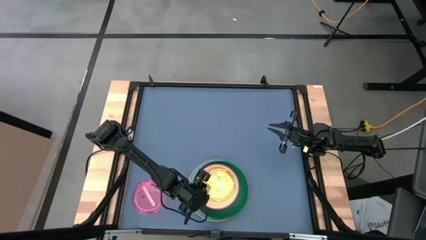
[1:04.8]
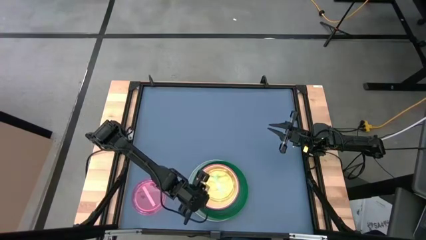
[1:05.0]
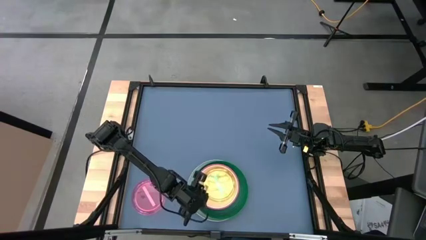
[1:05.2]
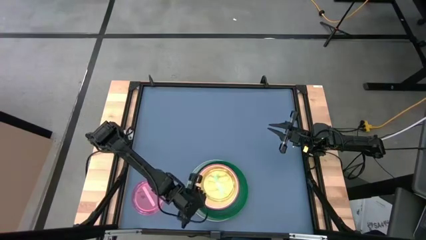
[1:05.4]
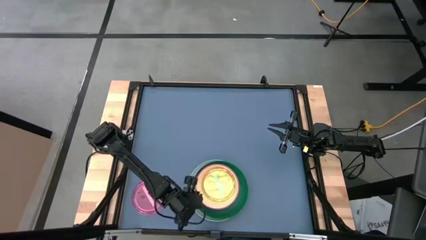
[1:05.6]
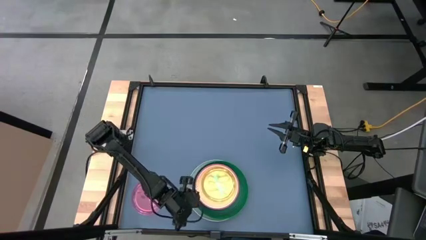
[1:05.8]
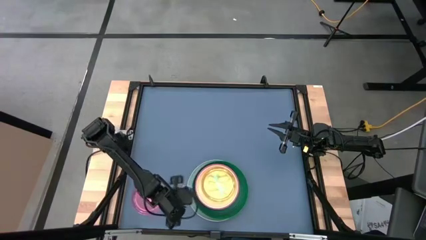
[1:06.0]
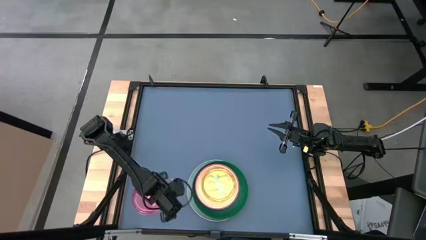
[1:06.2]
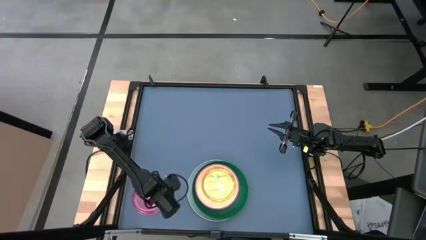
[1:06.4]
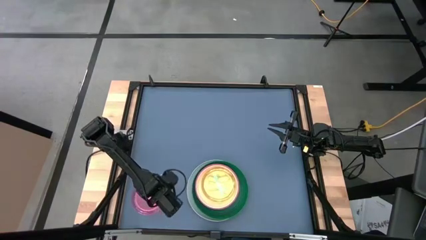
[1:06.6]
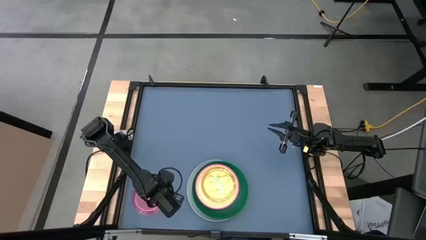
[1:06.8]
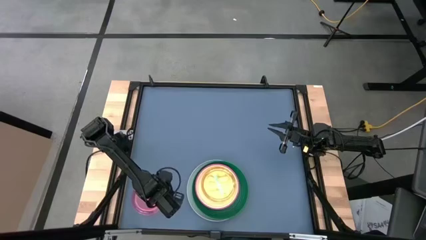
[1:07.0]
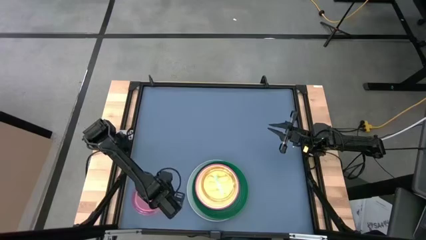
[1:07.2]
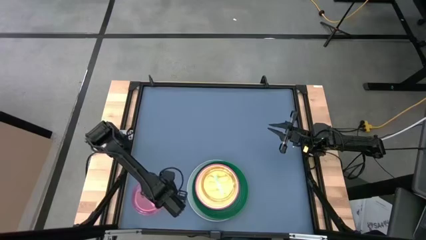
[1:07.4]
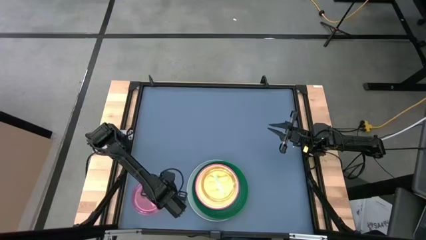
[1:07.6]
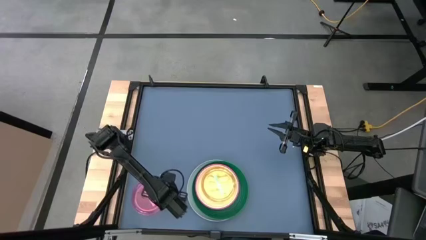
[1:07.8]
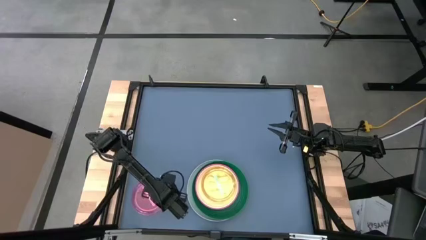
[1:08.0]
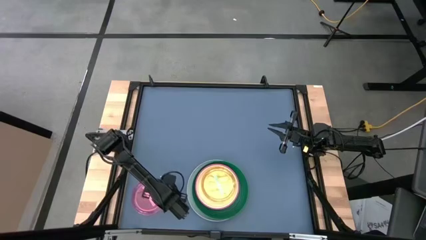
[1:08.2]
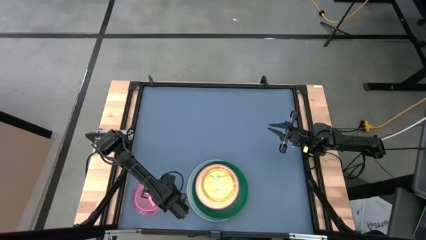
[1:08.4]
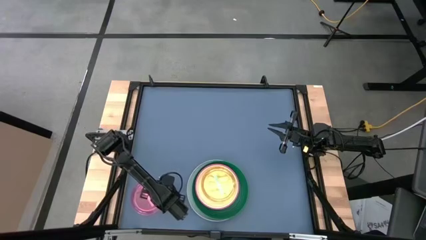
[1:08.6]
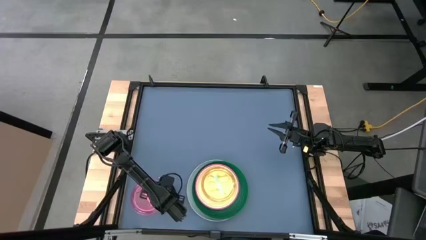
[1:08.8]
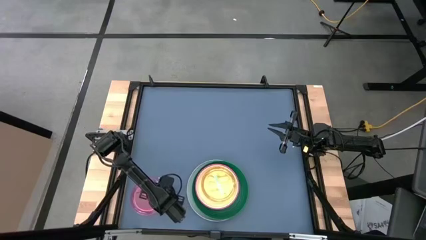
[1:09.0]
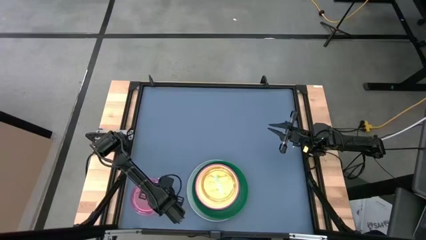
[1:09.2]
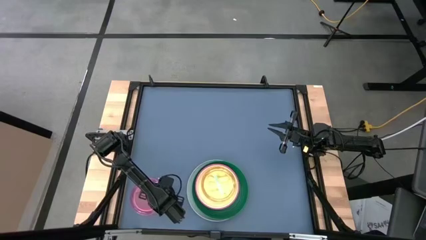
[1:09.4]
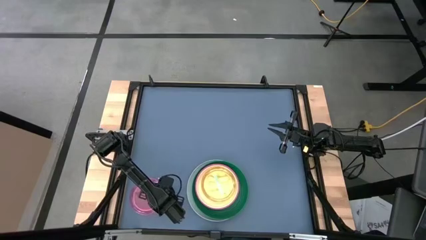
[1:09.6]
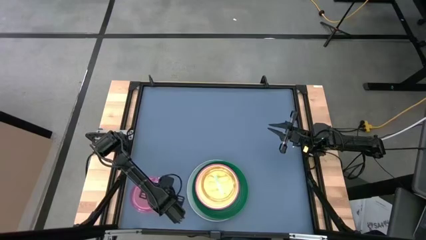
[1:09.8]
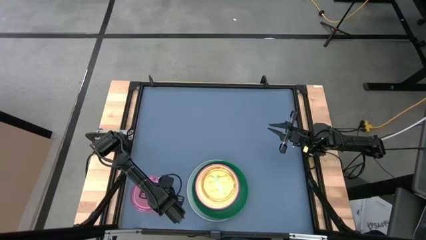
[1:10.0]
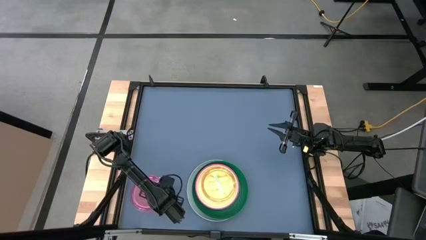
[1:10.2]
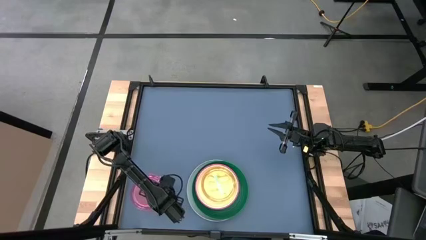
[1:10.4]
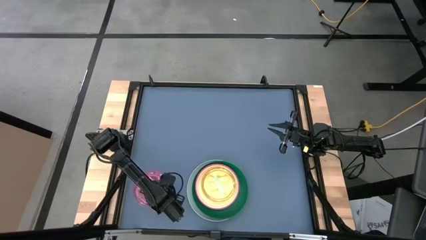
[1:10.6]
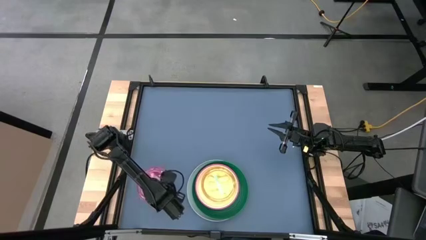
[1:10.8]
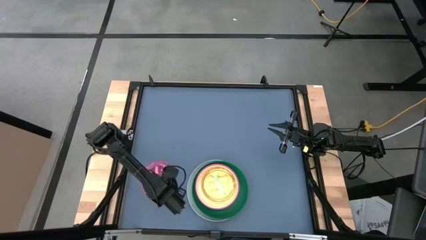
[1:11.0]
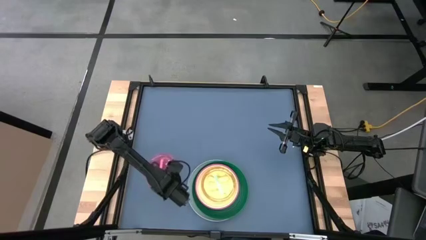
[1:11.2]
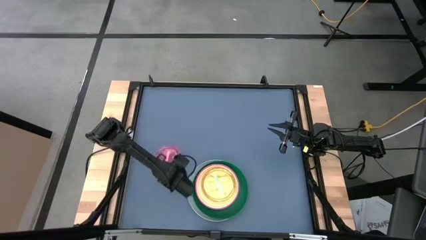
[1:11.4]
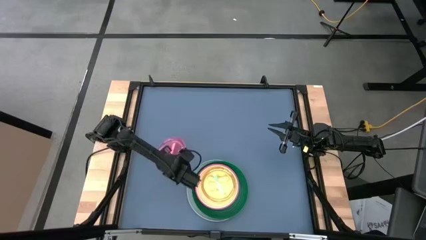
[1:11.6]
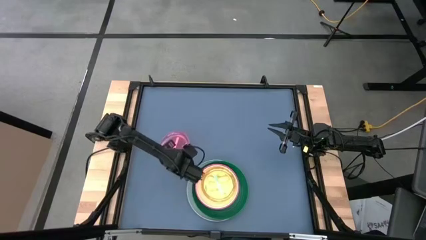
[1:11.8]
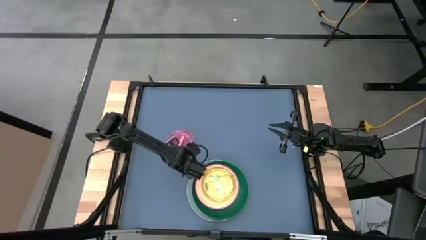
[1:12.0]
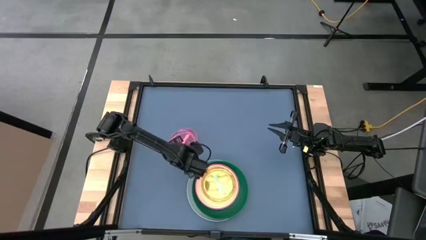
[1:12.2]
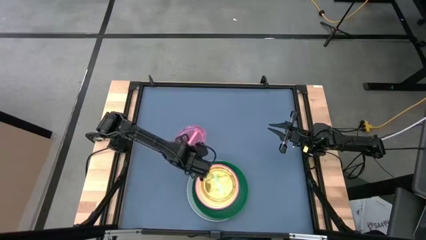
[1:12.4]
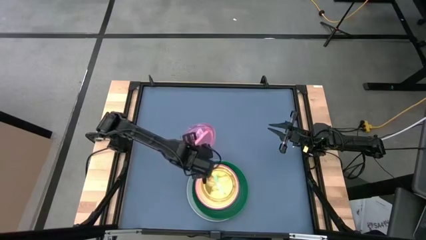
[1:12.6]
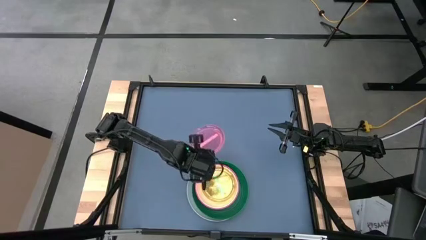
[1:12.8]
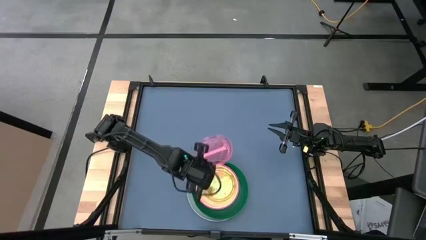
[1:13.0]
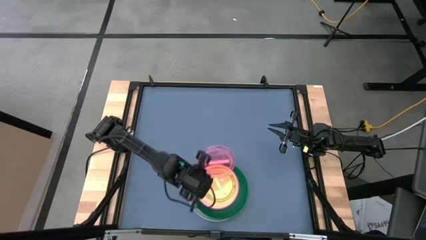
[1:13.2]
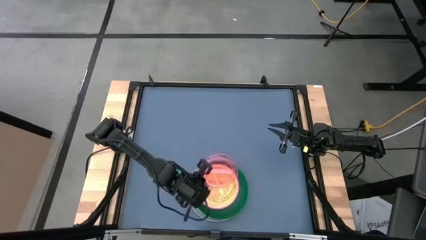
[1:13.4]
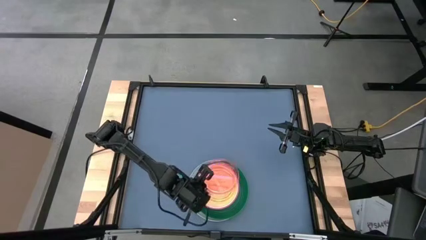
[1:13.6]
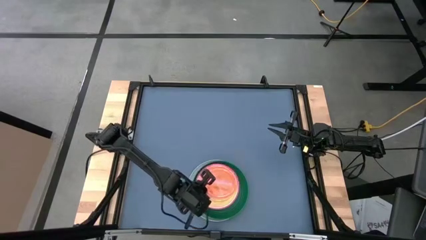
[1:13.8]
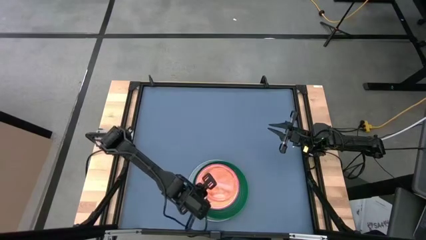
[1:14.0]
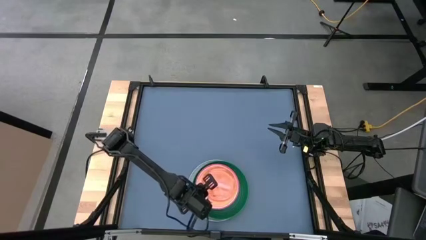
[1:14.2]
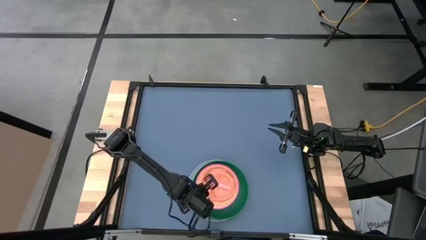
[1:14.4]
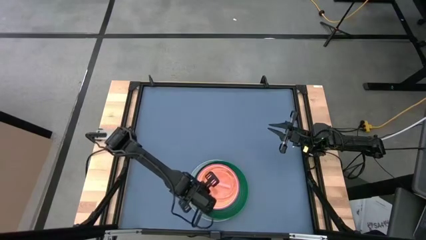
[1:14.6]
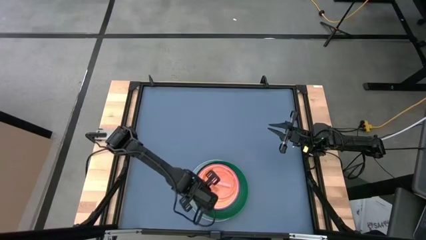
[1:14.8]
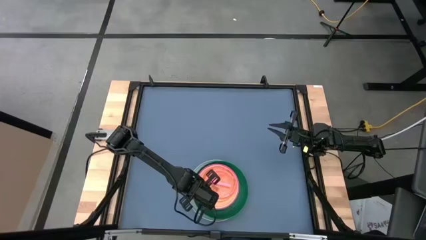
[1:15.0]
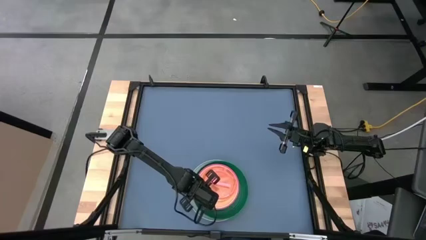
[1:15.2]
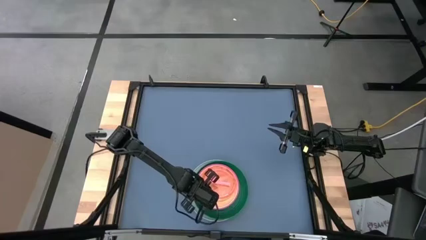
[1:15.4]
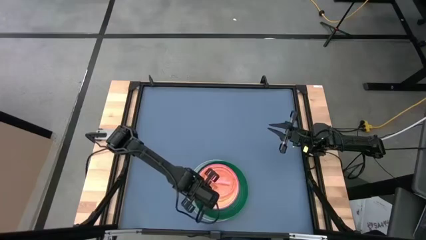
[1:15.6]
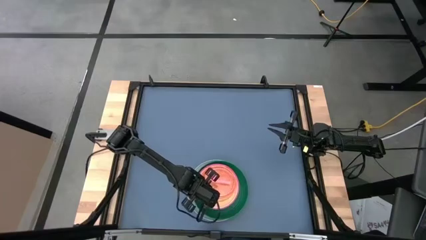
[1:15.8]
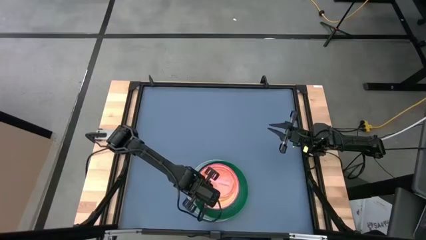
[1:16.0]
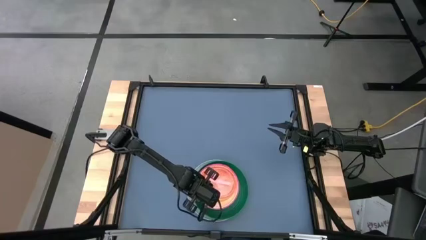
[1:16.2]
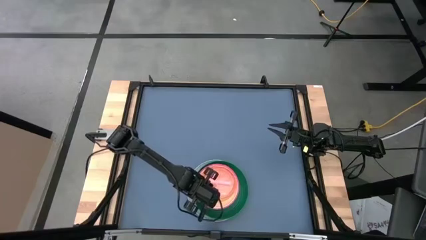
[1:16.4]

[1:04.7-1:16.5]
Task: Stack plastic plates
Stack the pink plate on the green plate
